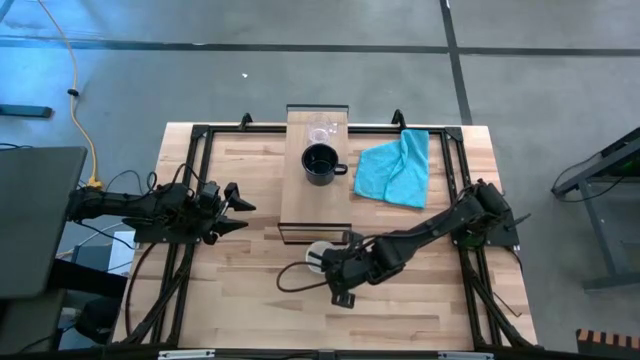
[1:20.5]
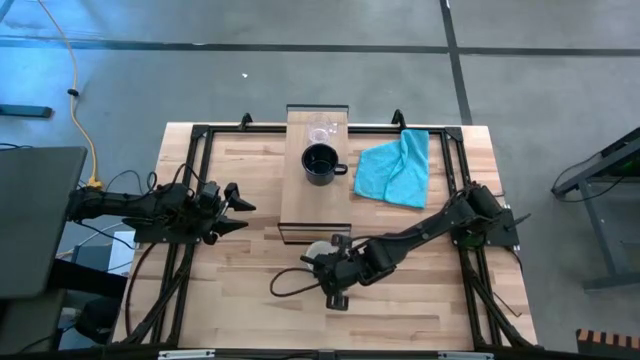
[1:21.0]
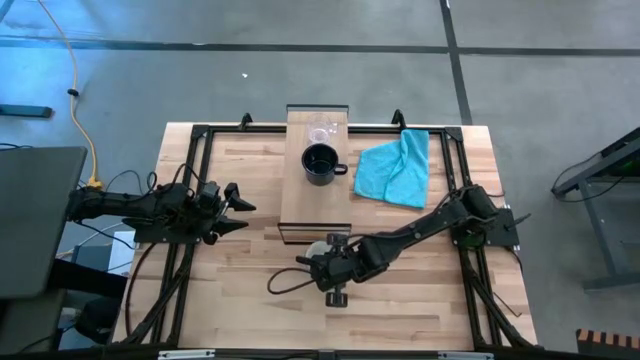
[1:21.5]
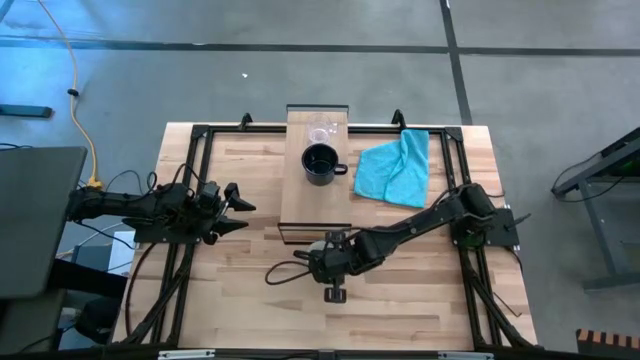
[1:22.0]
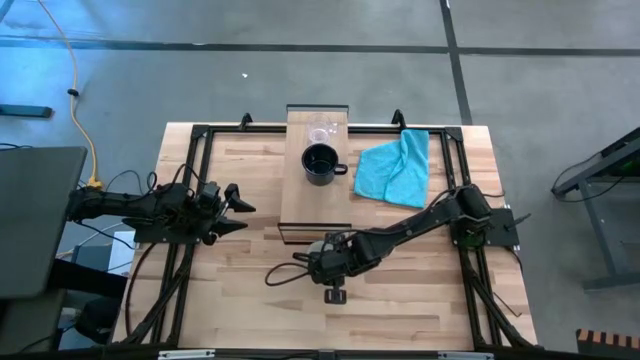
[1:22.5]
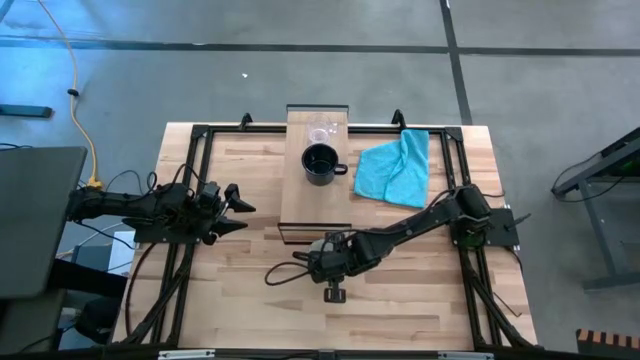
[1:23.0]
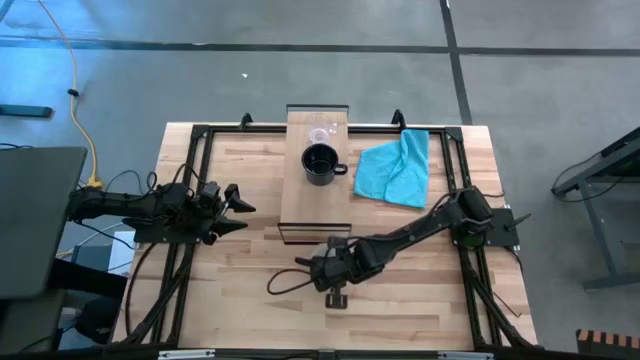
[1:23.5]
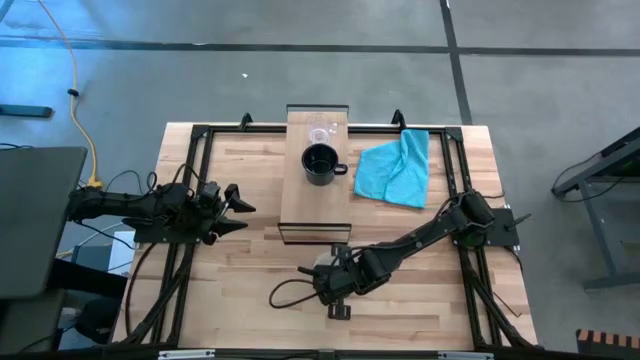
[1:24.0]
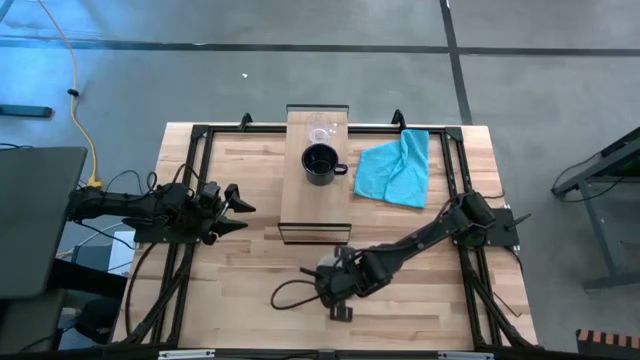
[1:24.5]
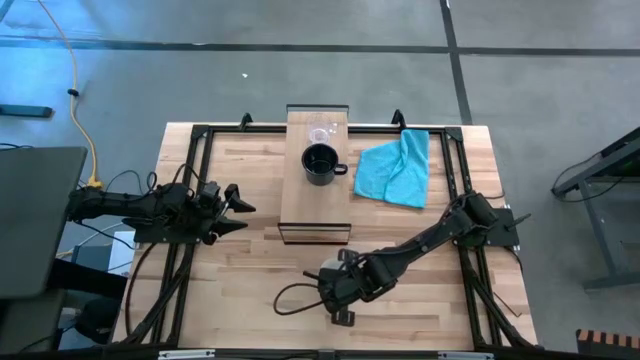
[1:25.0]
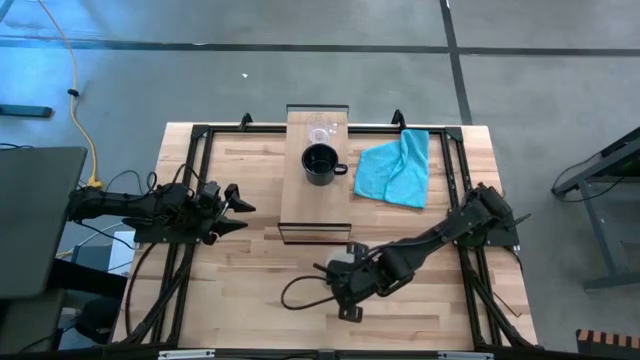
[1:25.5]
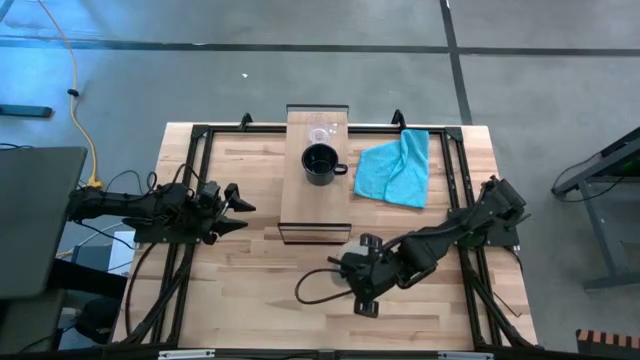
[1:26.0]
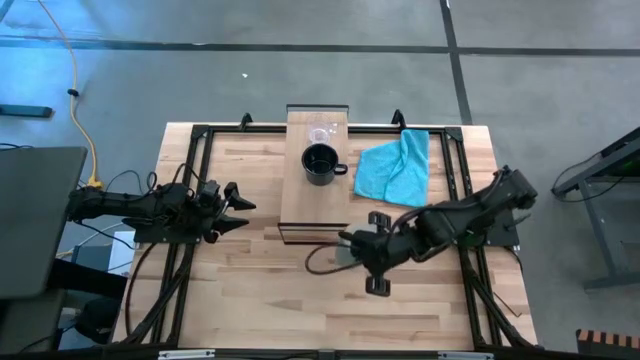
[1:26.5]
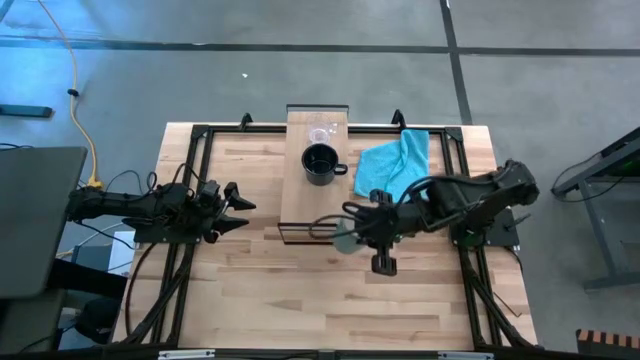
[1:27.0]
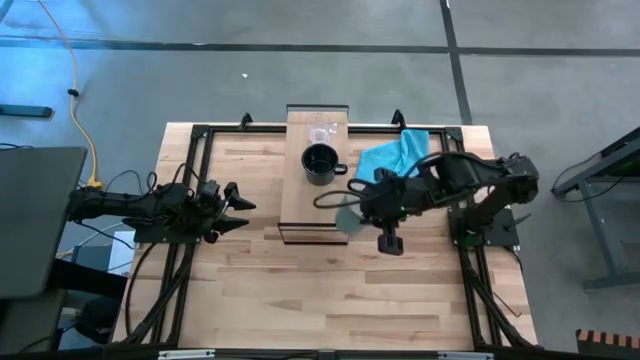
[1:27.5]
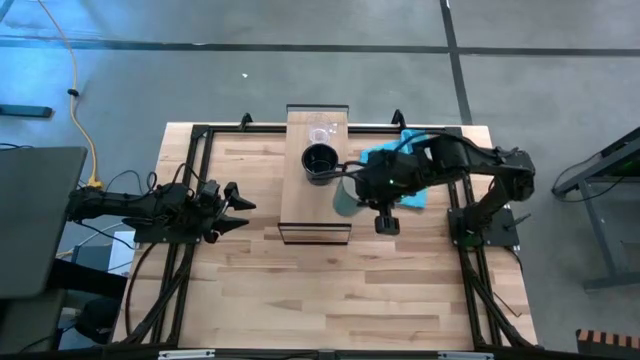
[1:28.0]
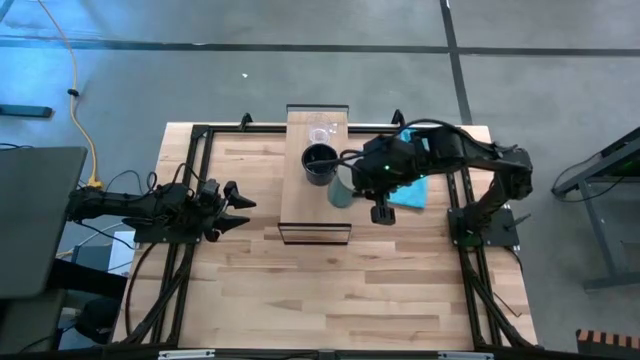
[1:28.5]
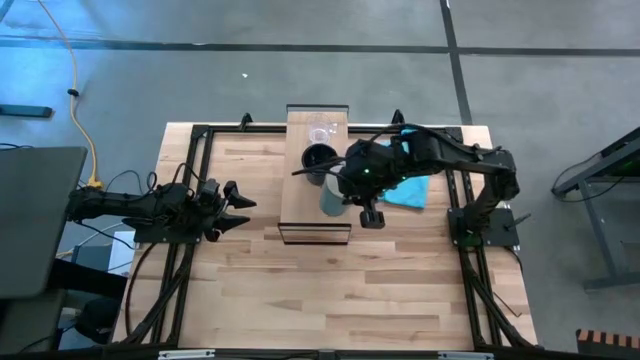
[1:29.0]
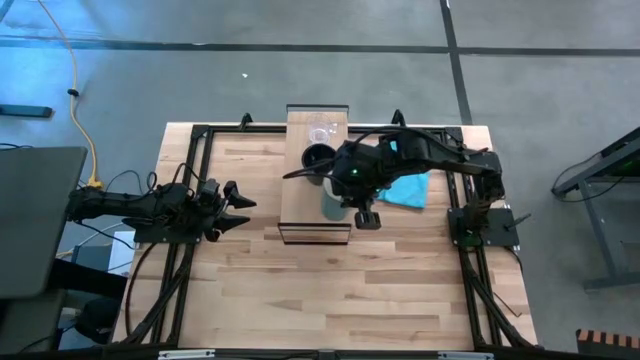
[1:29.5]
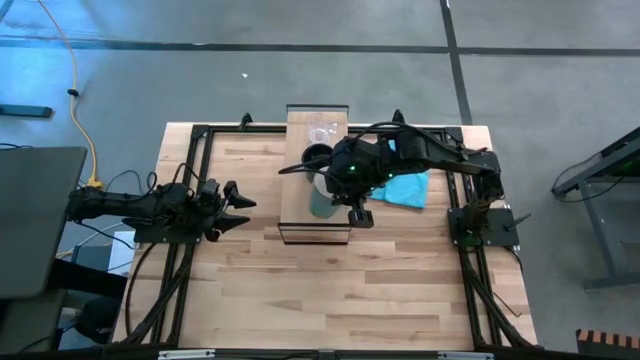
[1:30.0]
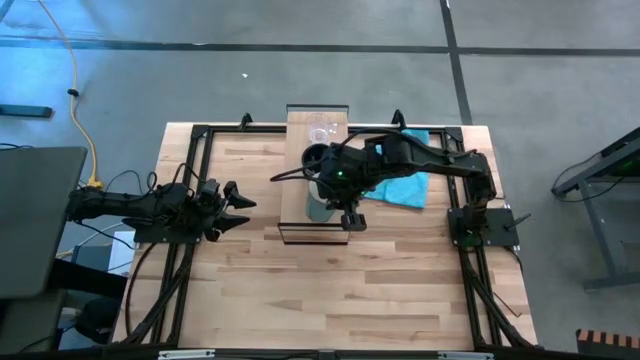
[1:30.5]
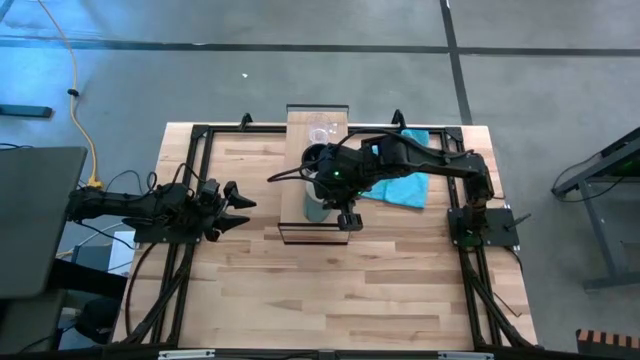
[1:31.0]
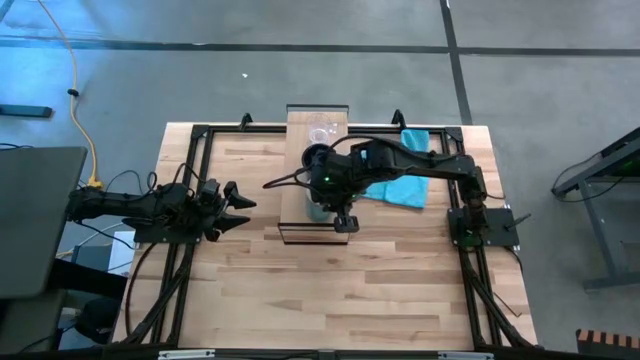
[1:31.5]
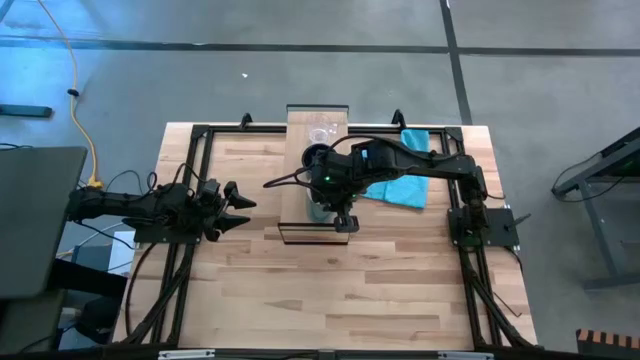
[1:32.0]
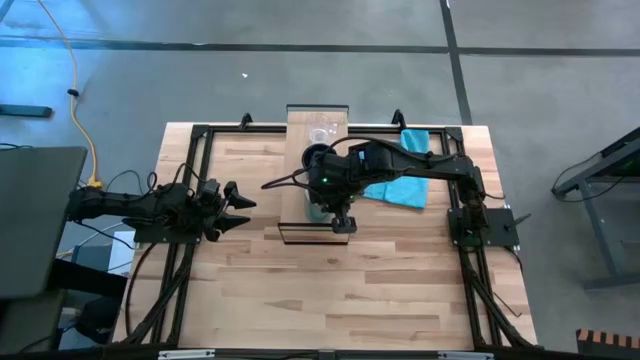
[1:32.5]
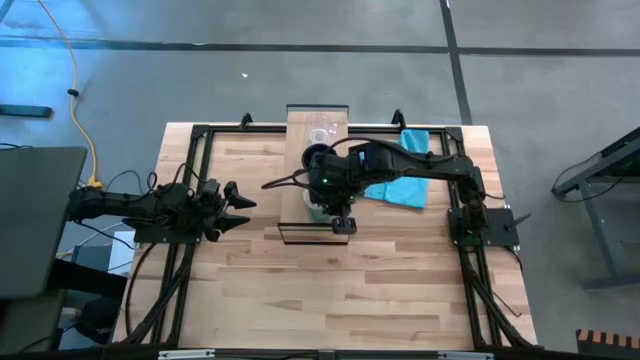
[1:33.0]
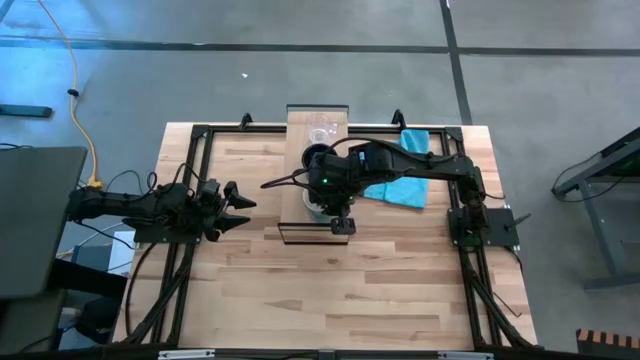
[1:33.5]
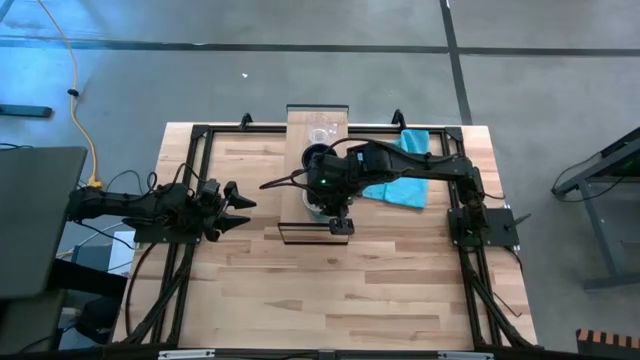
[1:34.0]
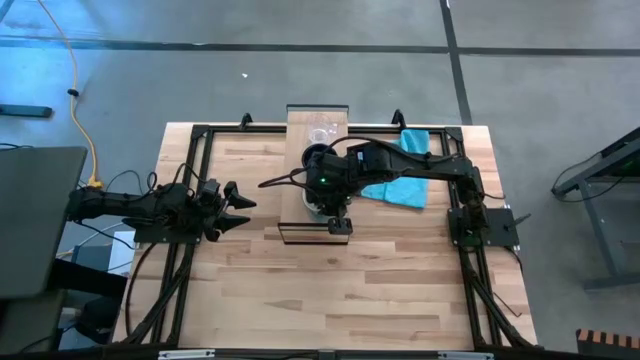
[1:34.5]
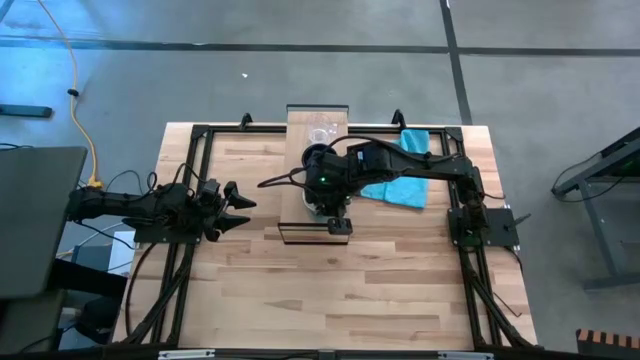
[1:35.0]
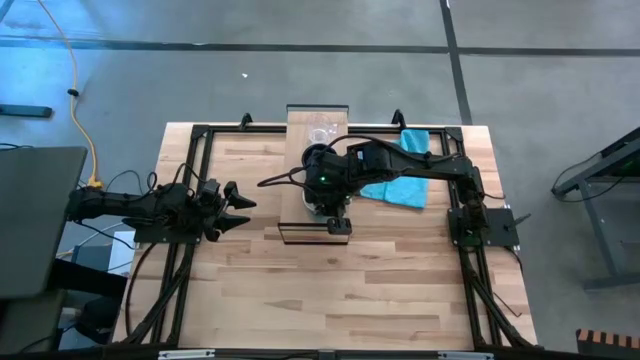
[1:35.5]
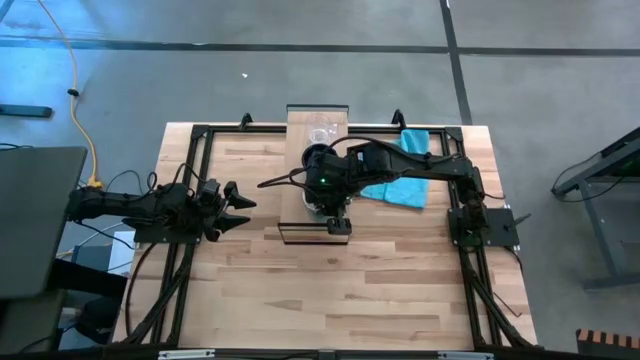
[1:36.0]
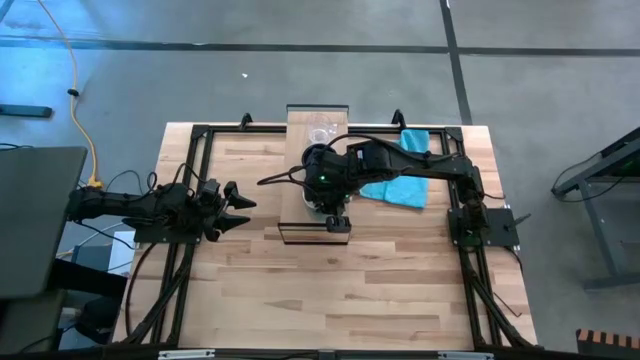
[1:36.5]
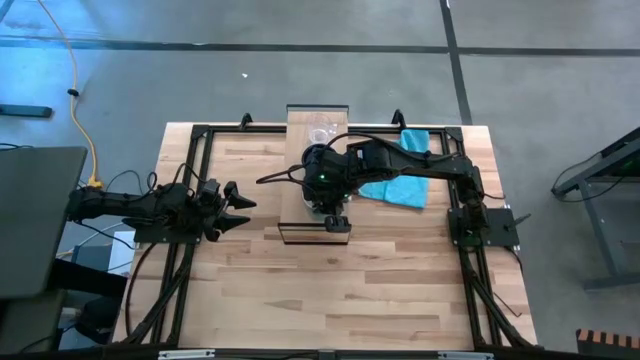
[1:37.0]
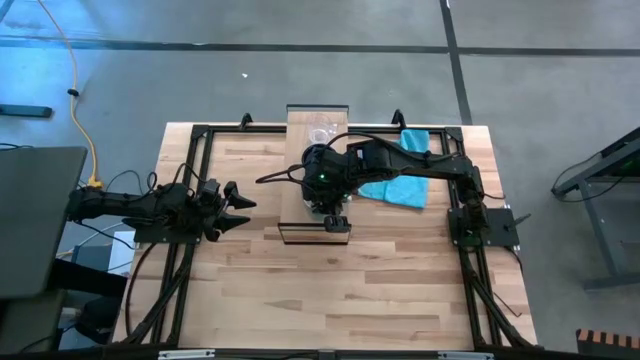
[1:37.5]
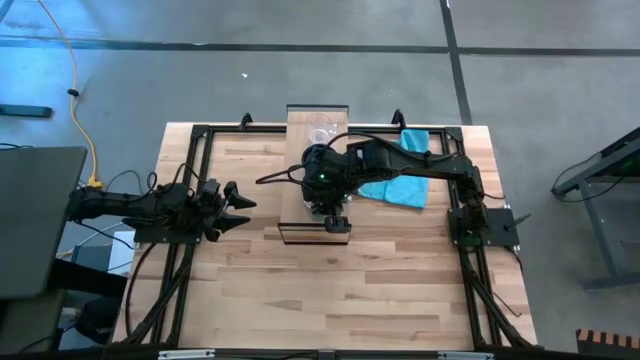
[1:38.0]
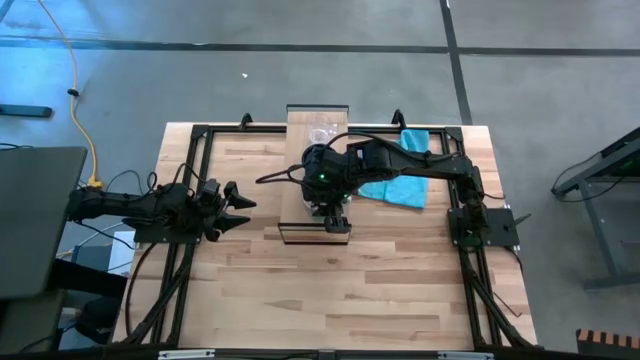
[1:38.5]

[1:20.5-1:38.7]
Task: Stack small to large cups/mugs on shelf
Put the blue mug on the shelf

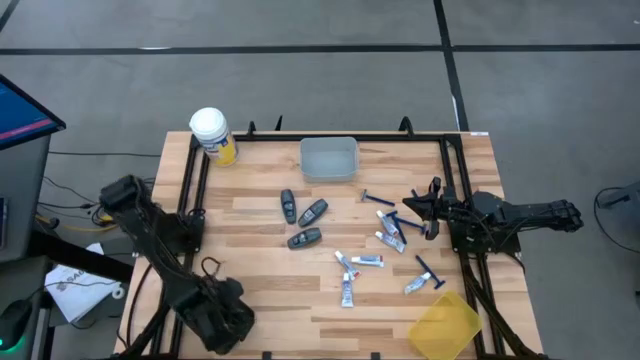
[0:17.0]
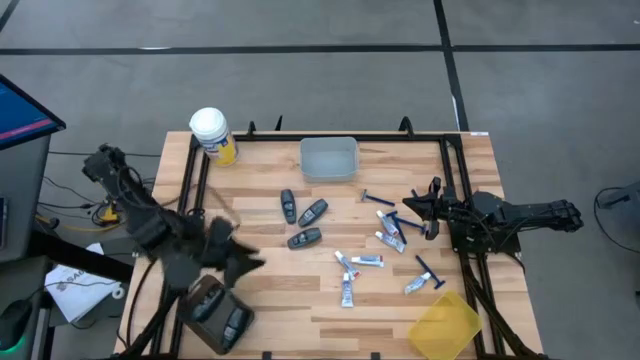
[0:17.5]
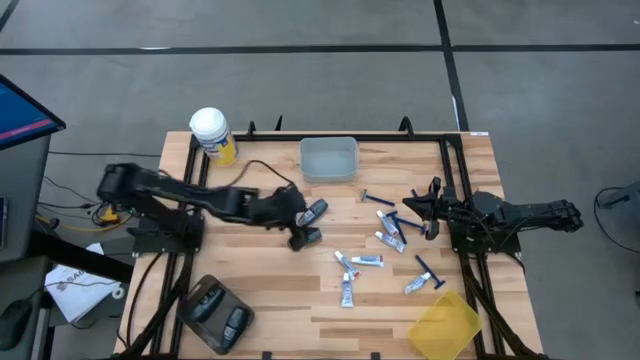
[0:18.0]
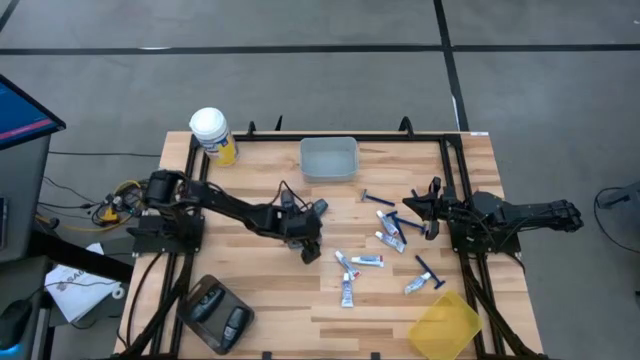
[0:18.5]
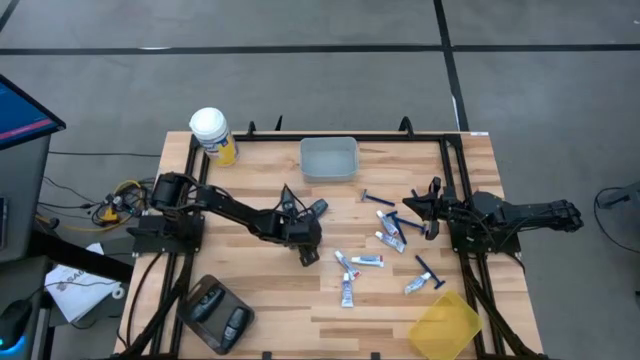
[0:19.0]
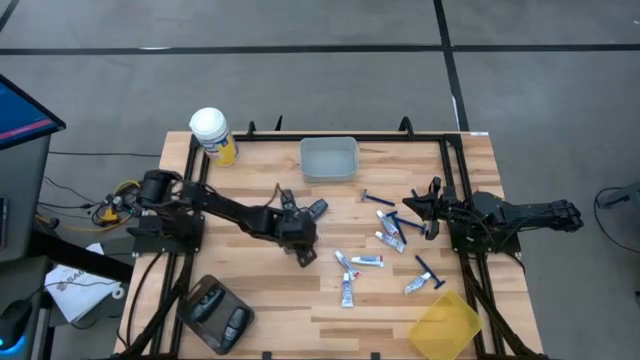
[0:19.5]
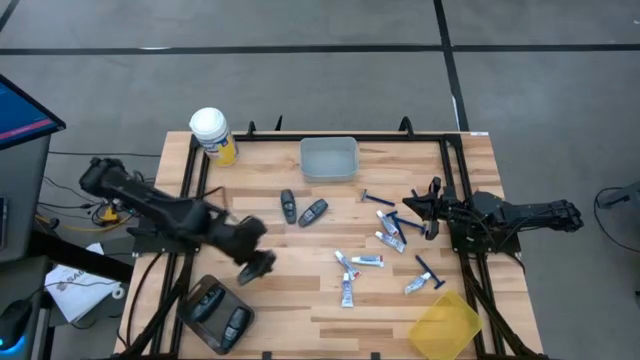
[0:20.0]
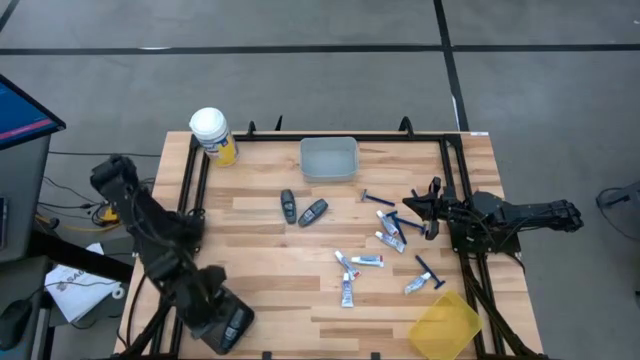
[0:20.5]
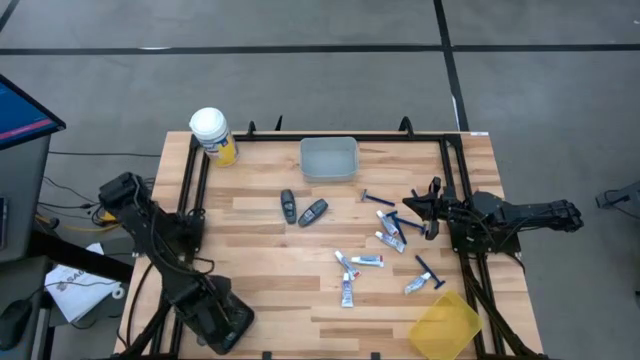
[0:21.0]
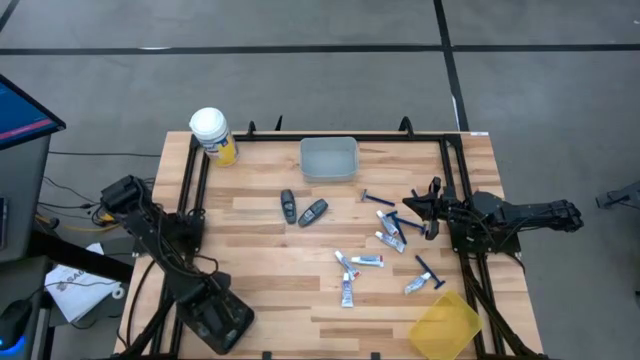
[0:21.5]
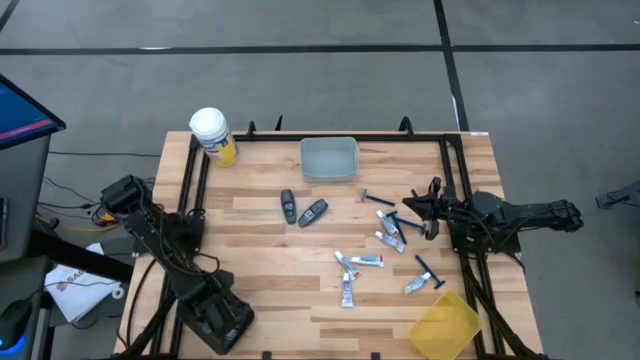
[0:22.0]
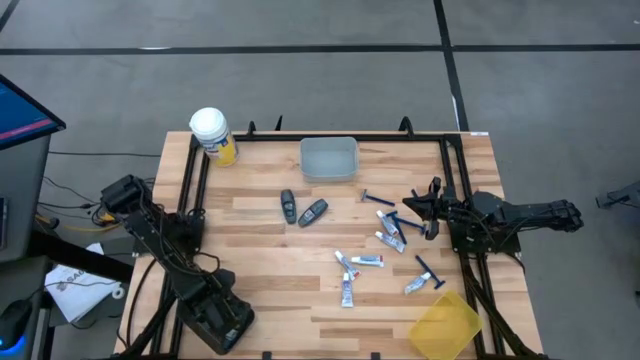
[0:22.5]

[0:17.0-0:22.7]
Task: Pick & Place Travel size toiletries
Put the black deodorant into the black bin
